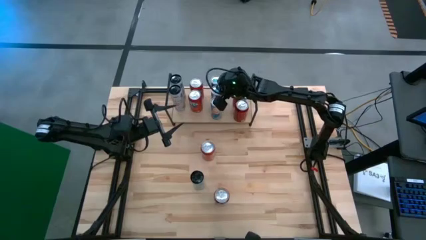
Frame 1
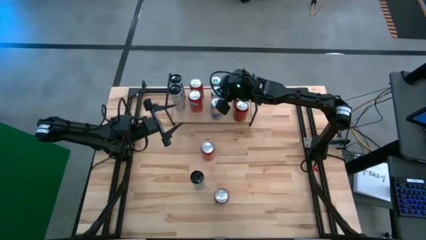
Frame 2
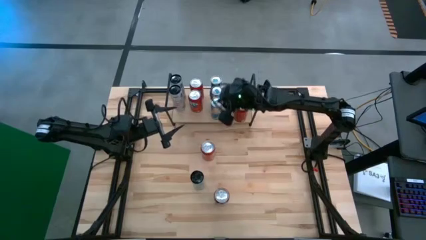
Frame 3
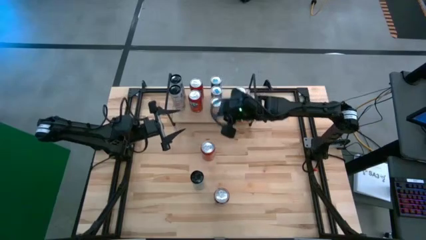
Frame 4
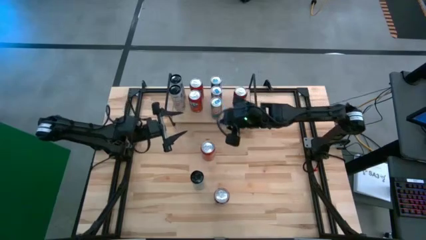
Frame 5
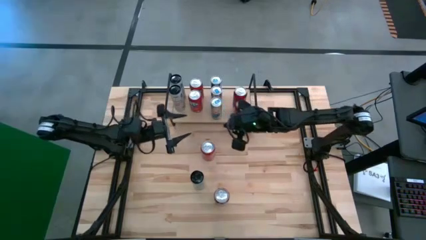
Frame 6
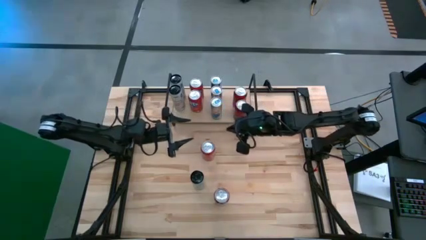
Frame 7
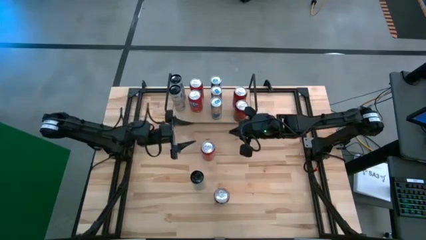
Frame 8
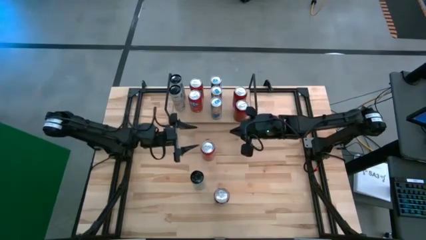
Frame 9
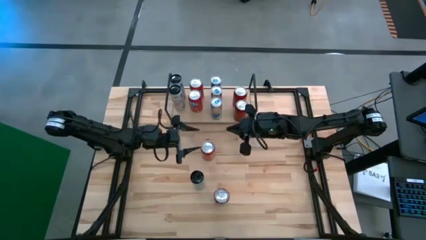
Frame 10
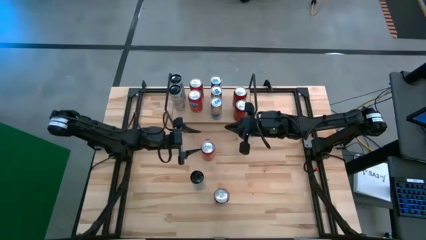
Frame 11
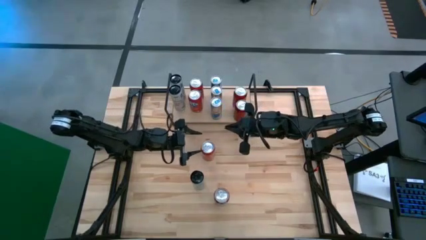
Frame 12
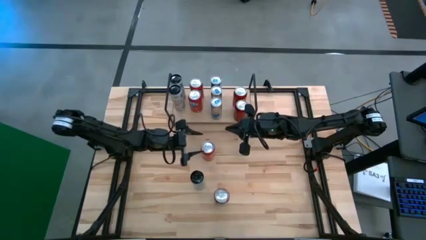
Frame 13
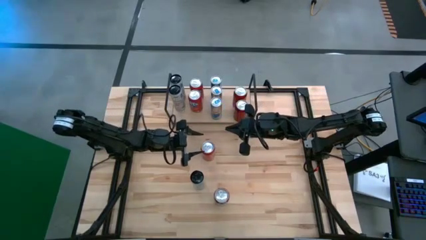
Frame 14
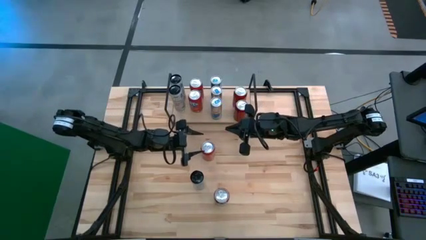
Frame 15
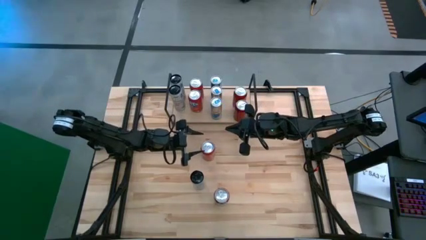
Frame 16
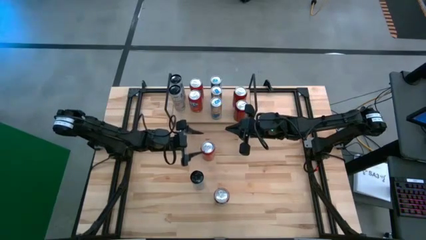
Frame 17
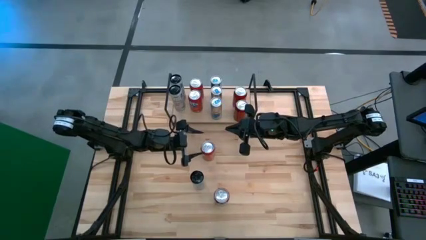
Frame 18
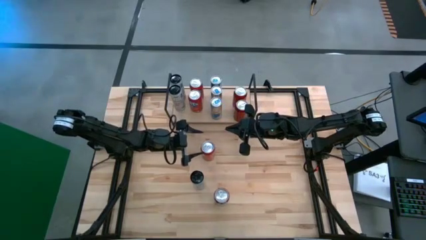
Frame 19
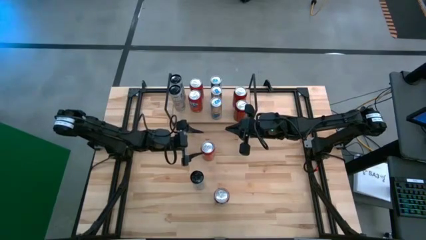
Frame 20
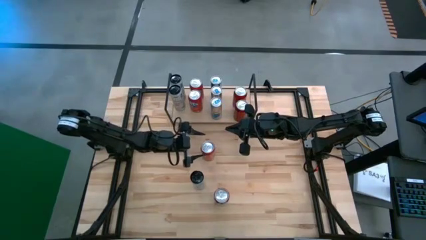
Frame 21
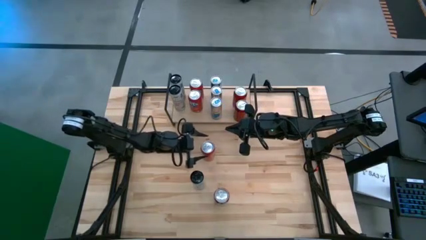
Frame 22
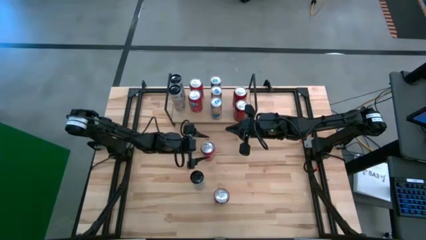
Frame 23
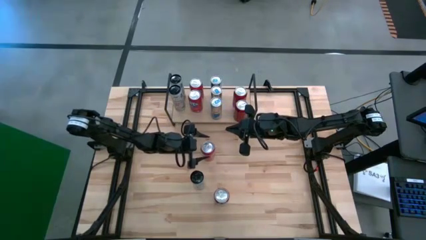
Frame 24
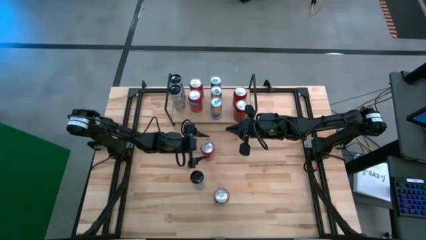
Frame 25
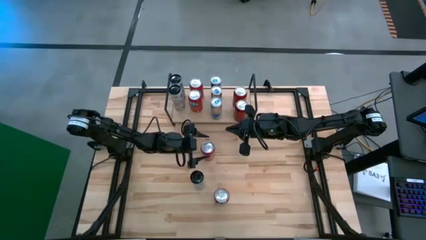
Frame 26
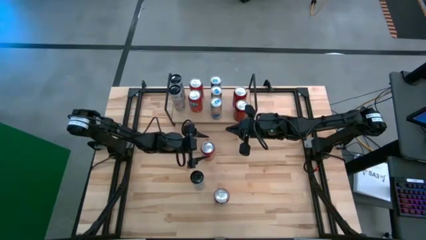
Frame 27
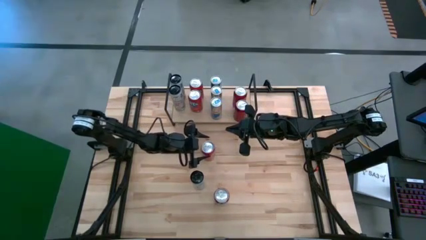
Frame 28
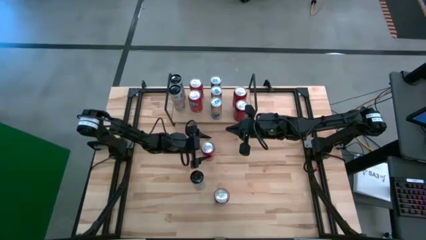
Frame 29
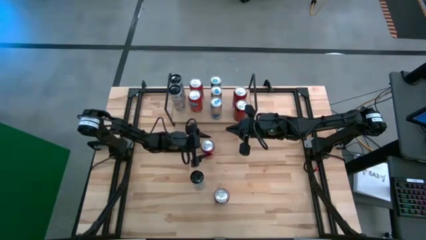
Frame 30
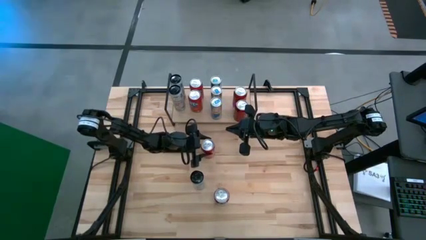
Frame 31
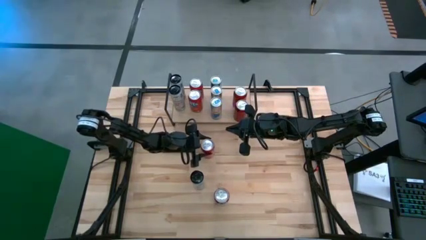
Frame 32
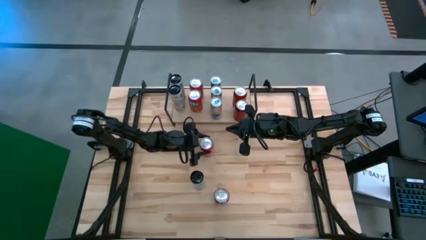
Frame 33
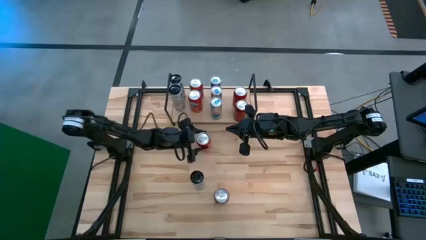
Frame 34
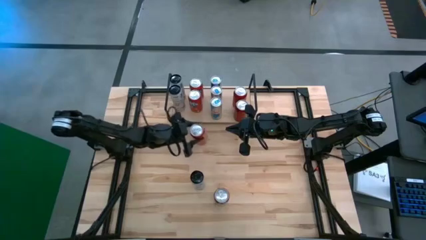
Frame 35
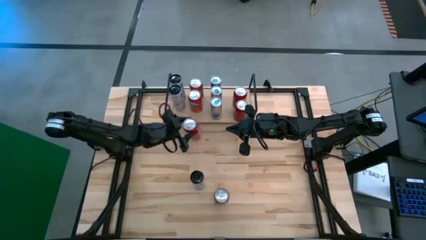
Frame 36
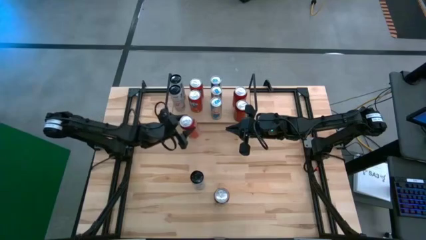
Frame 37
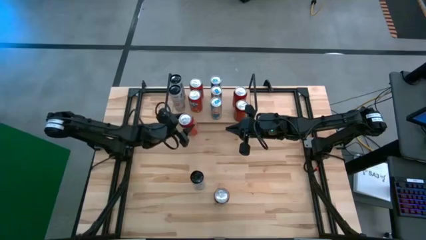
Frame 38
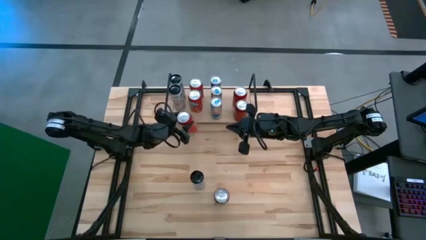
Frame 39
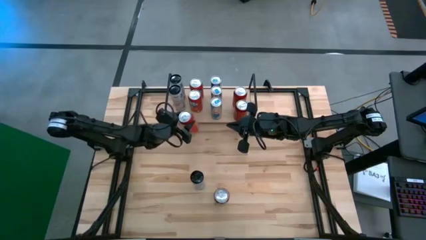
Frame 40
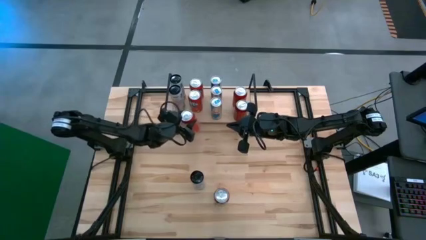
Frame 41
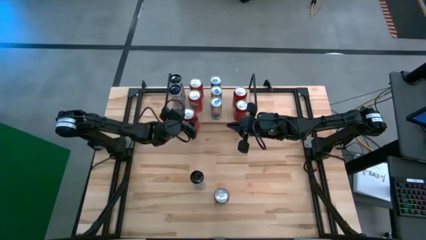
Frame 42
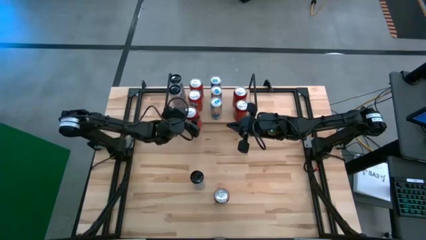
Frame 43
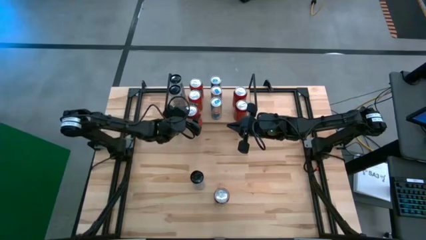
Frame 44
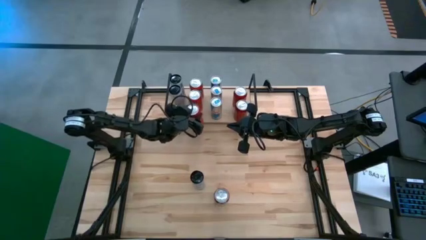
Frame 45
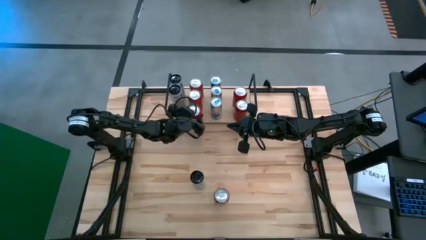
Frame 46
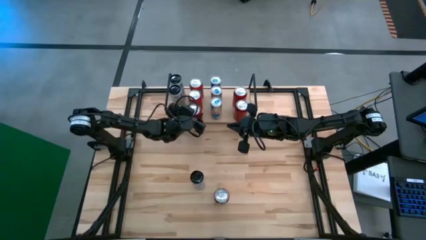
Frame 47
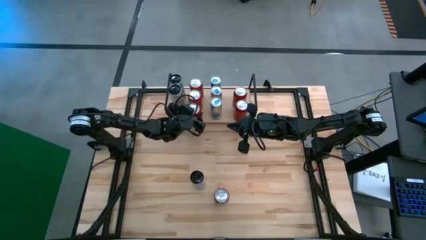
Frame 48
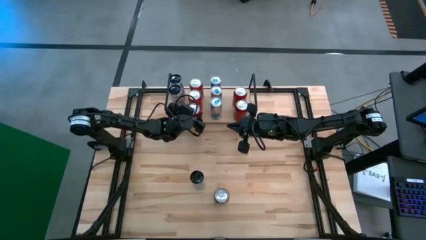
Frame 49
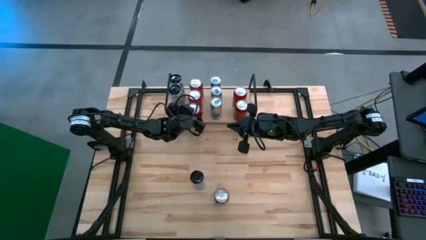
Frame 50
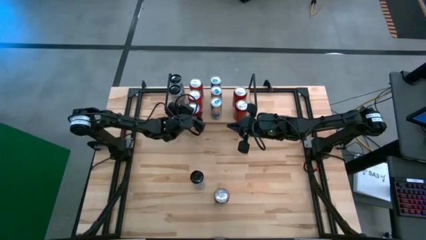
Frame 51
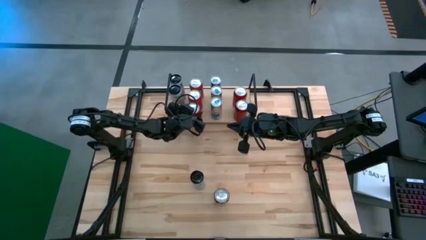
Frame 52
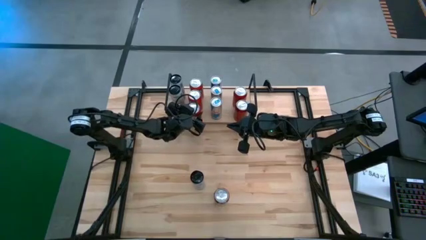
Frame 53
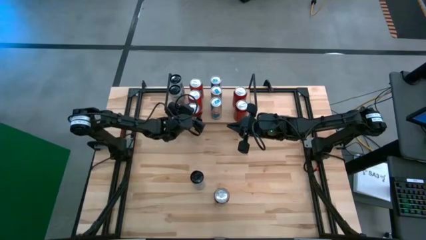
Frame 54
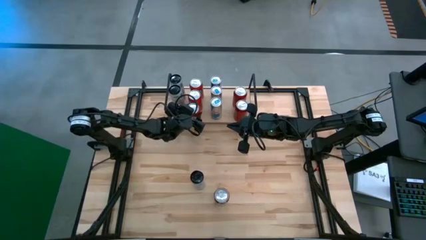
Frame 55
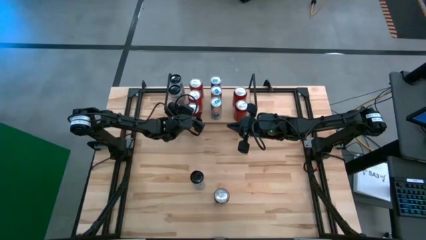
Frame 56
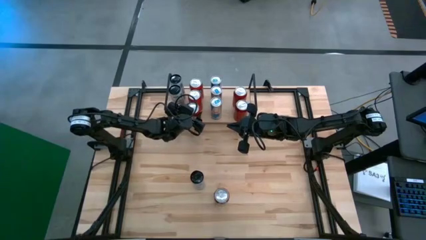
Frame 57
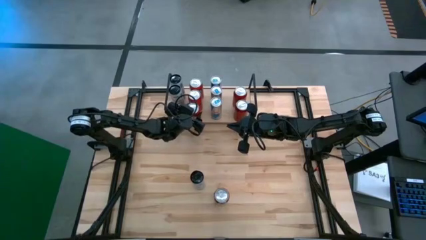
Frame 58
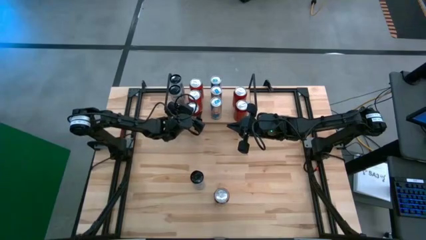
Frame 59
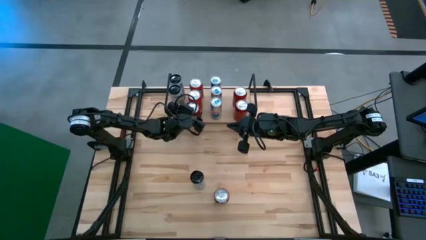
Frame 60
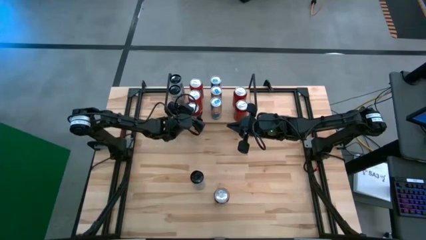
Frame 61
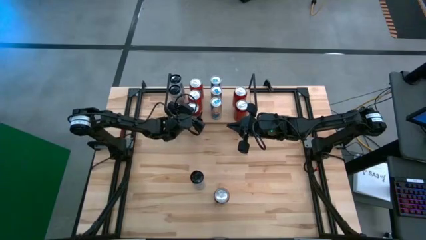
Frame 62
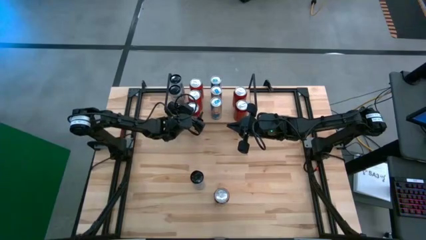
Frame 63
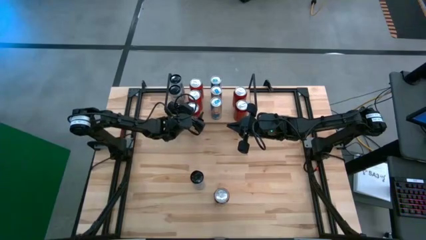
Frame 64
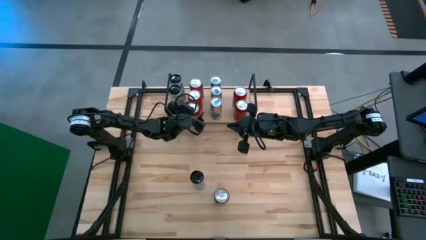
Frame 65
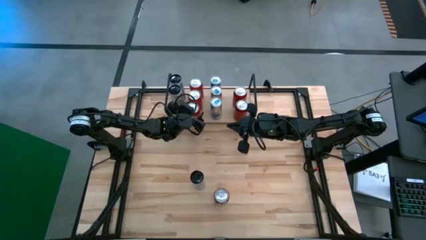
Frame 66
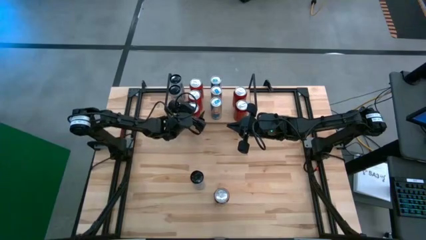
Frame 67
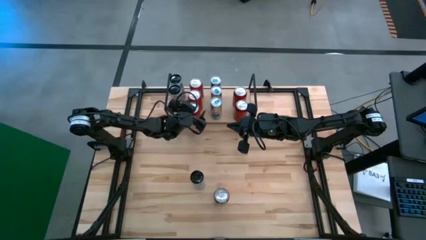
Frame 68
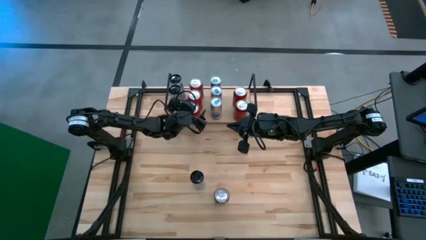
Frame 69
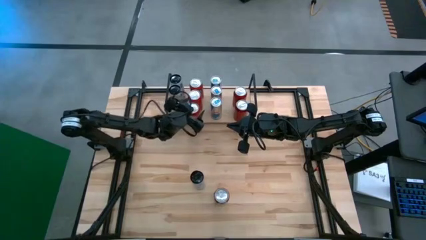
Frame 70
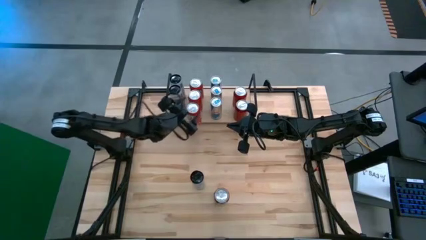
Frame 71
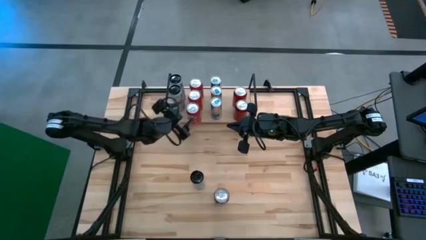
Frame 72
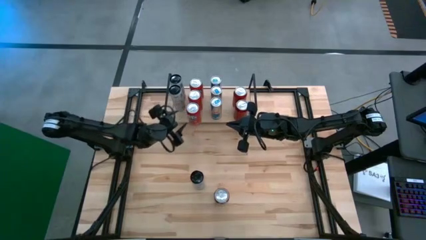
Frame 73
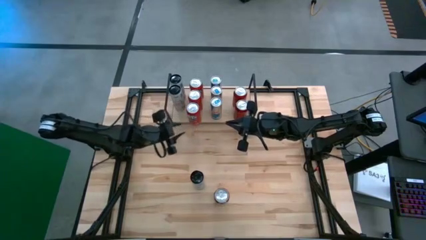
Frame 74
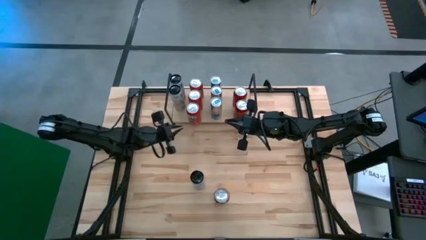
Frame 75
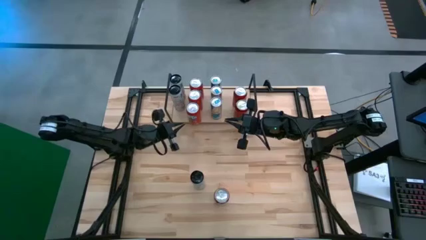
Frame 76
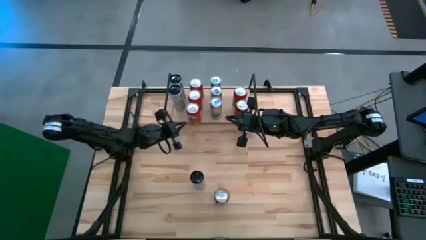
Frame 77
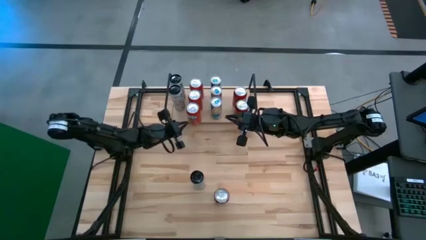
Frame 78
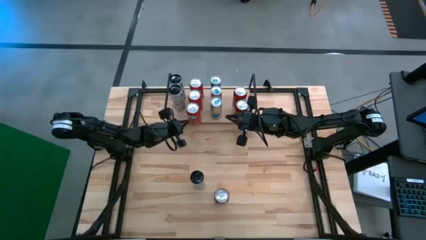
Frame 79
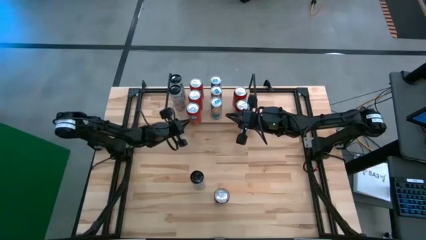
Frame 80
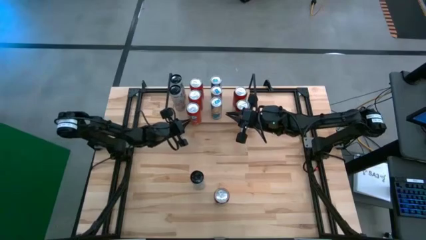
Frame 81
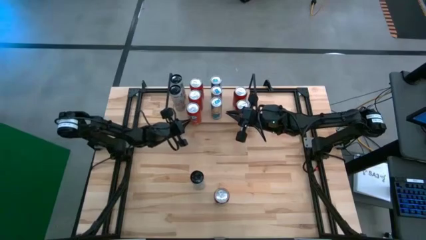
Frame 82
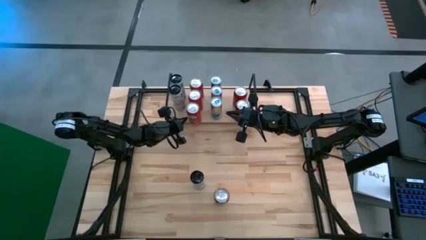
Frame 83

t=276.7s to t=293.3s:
Task: Place canned beverage on shelf
Put the orange soda can on the shelf aligned with the other orange soda cans
